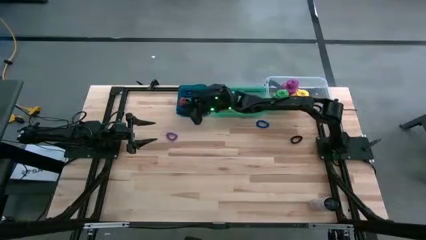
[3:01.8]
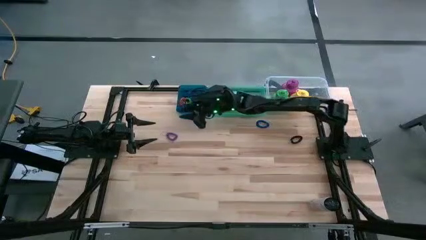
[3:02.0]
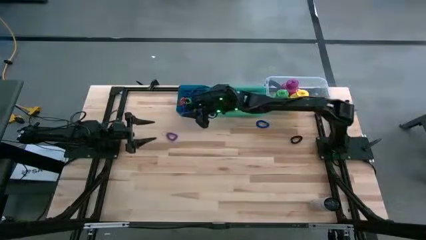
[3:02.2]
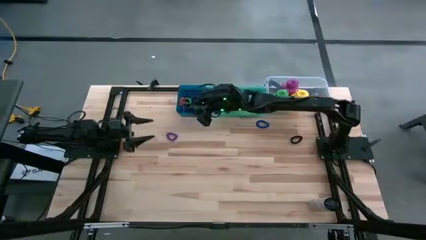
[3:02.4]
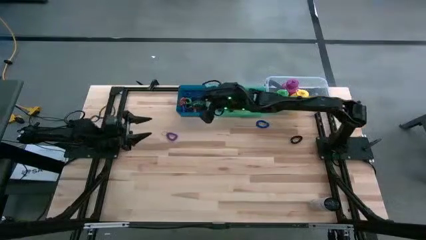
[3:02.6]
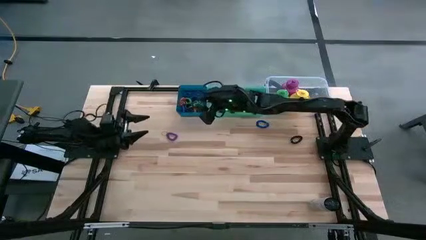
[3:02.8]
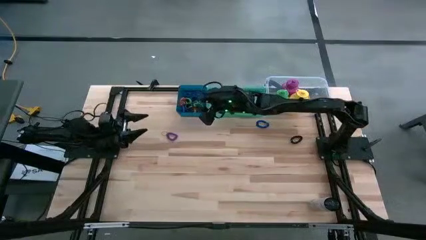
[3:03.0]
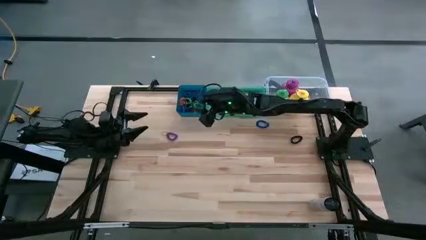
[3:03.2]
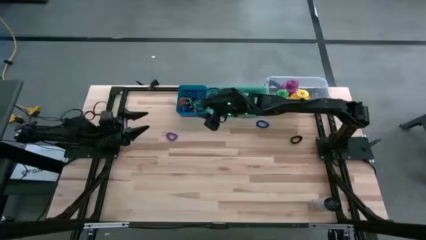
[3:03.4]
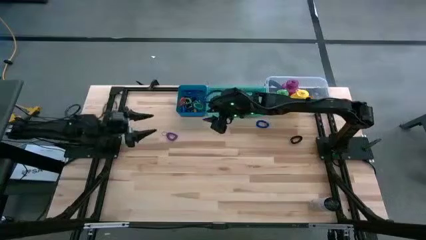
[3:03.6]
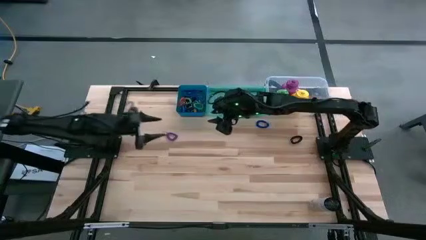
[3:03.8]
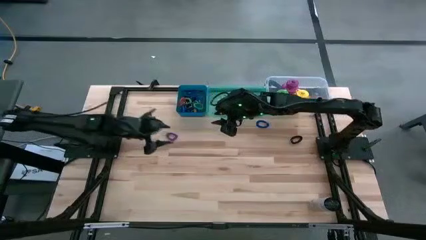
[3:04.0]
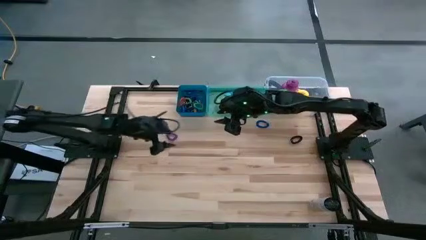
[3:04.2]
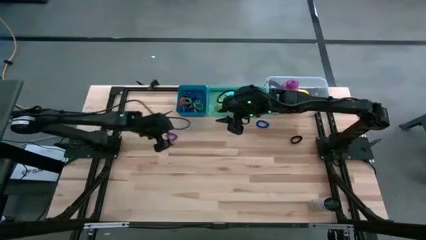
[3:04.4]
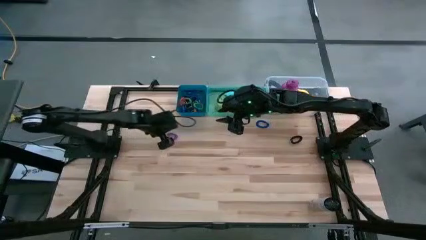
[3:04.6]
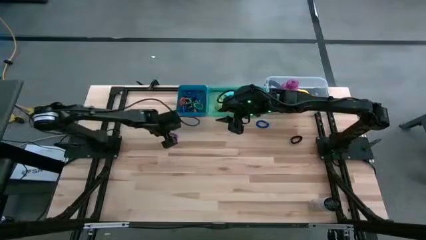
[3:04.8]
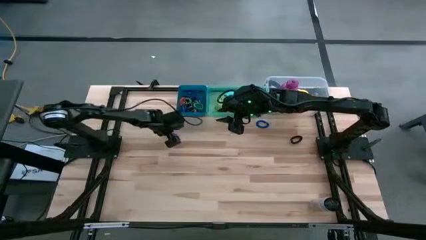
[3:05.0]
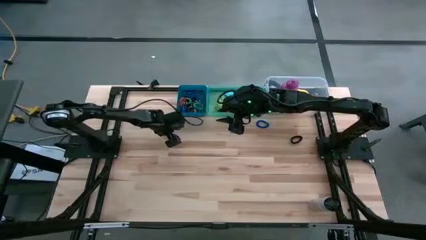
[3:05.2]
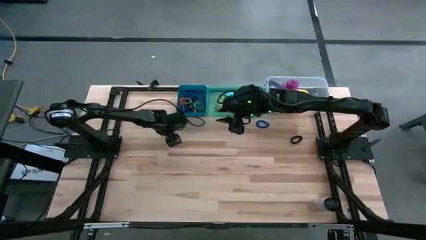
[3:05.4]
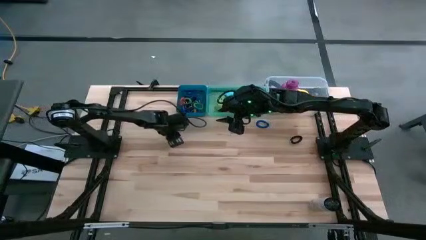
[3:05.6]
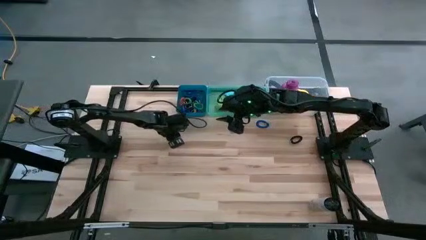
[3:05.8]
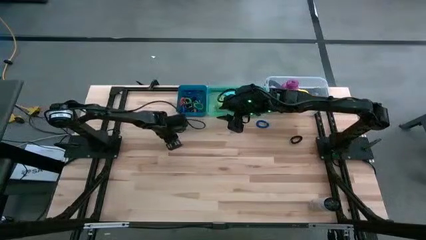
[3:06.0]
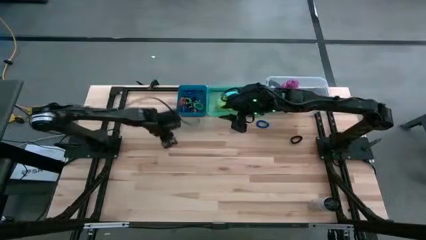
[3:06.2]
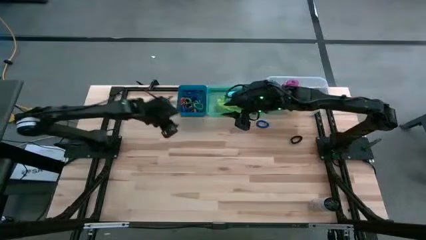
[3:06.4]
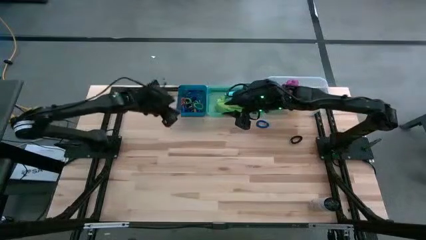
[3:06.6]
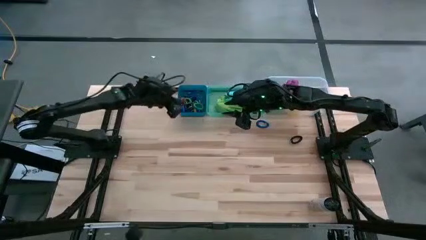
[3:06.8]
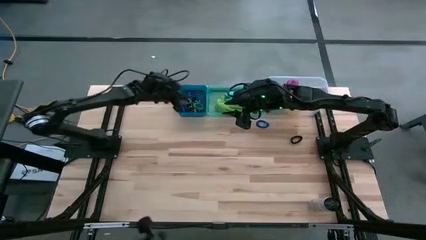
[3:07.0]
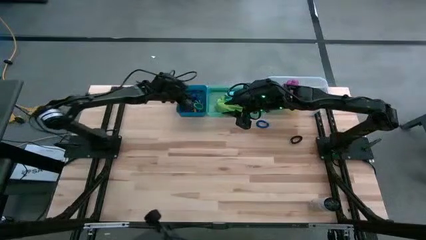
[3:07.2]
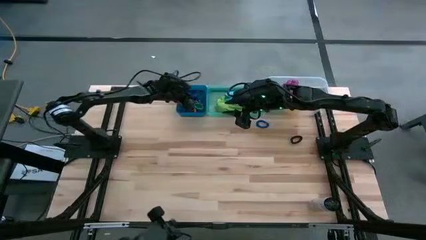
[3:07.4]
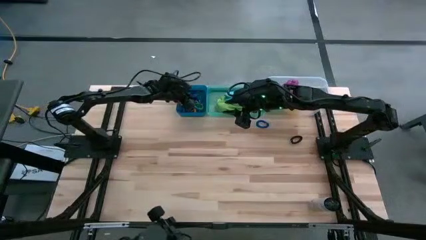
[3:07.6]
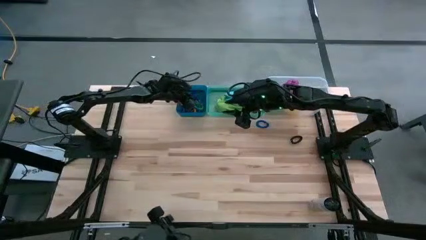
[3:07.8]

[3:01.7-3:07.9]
Task: Pick & Place Sports Items
Put the violet spring keychain into the blue bin

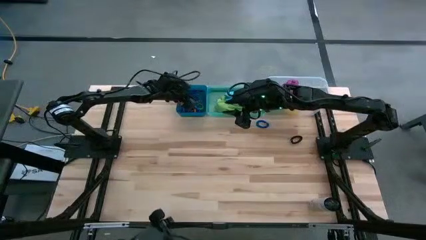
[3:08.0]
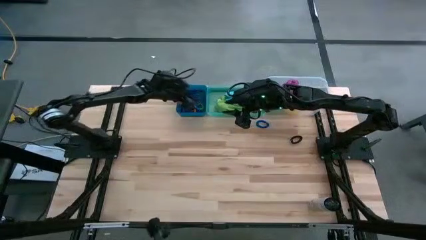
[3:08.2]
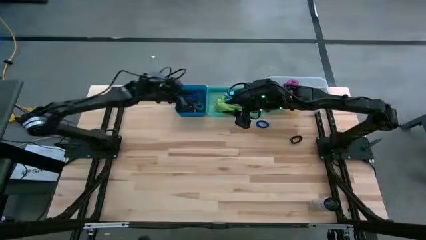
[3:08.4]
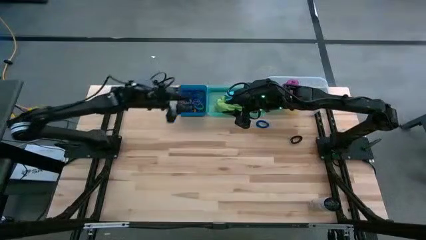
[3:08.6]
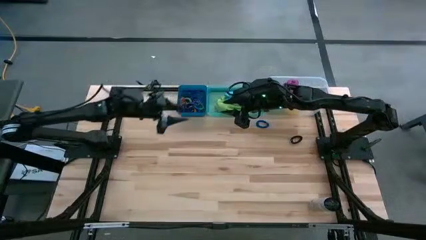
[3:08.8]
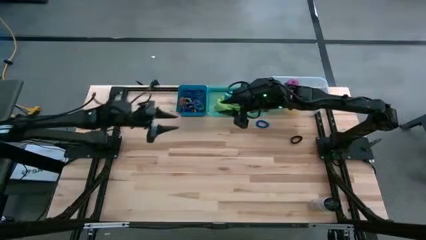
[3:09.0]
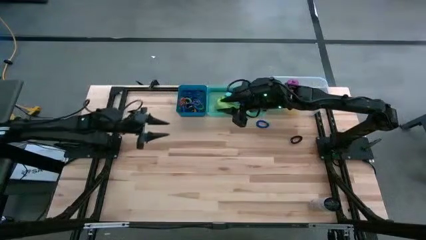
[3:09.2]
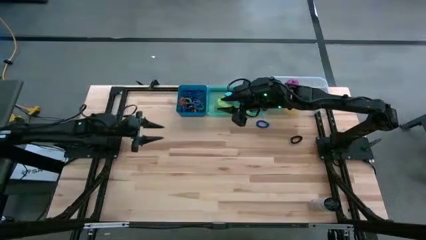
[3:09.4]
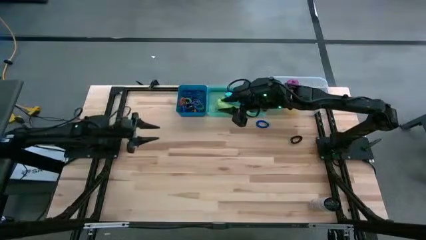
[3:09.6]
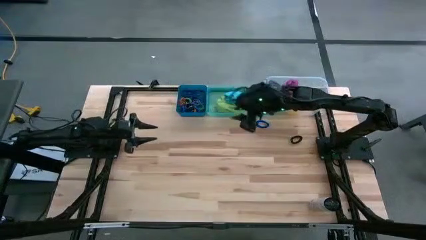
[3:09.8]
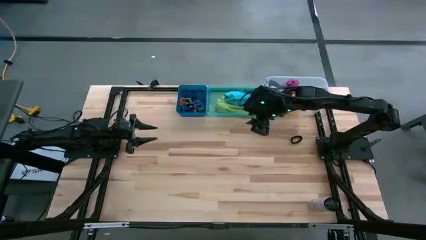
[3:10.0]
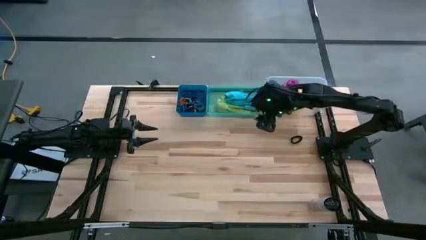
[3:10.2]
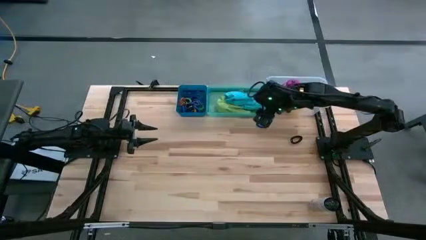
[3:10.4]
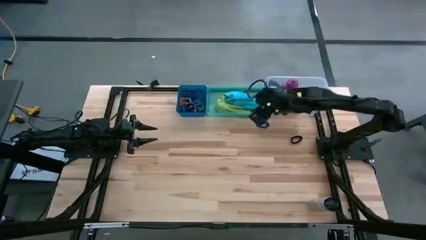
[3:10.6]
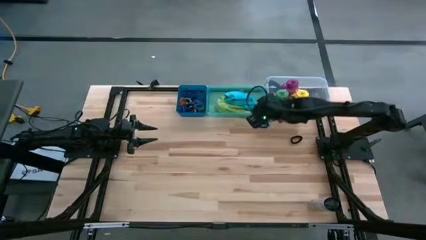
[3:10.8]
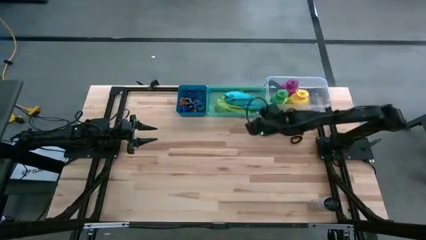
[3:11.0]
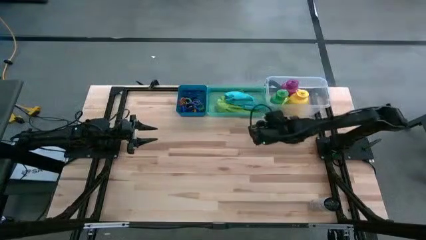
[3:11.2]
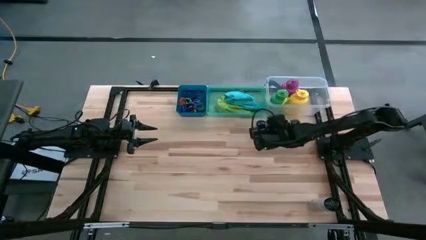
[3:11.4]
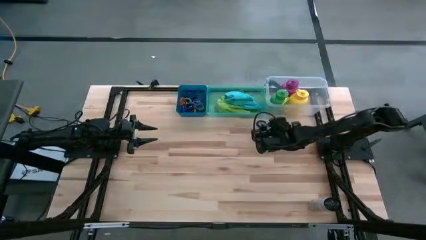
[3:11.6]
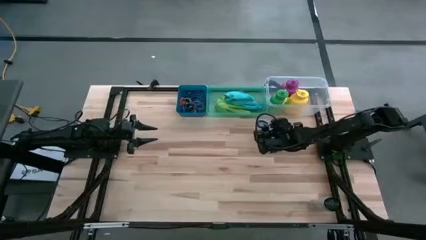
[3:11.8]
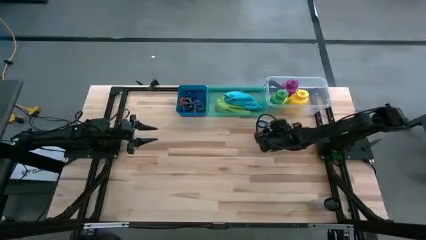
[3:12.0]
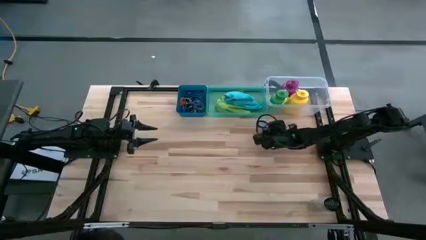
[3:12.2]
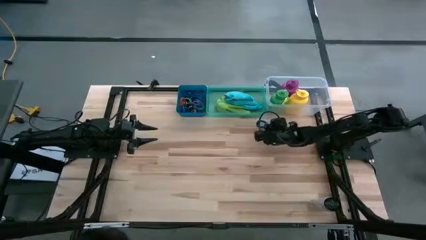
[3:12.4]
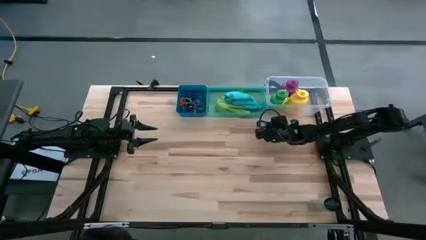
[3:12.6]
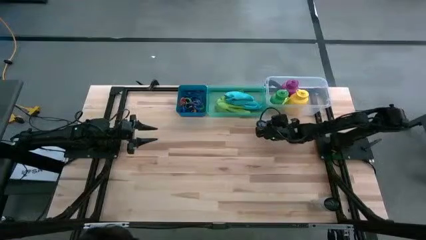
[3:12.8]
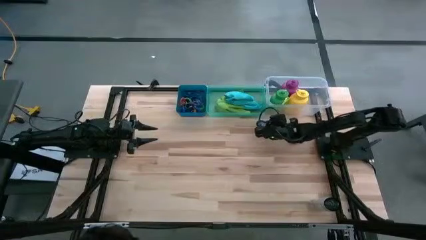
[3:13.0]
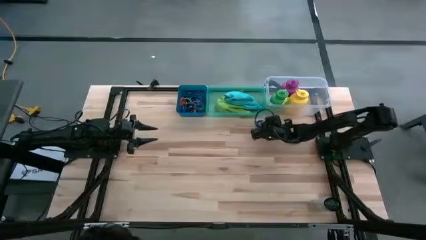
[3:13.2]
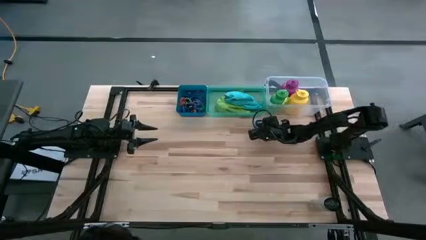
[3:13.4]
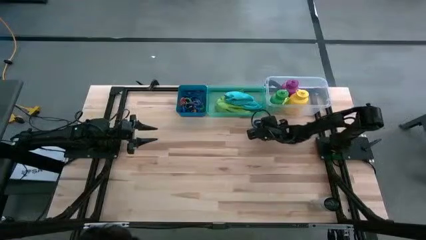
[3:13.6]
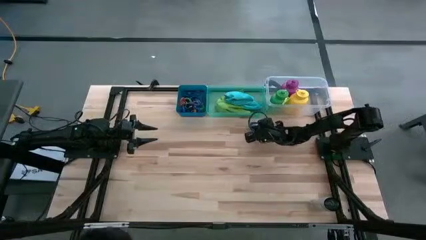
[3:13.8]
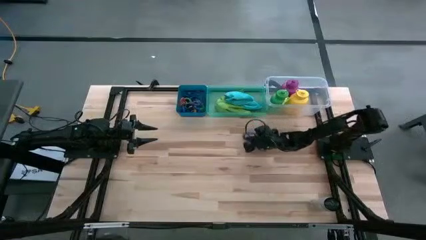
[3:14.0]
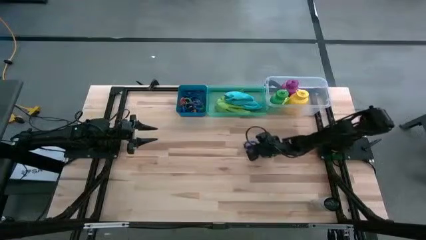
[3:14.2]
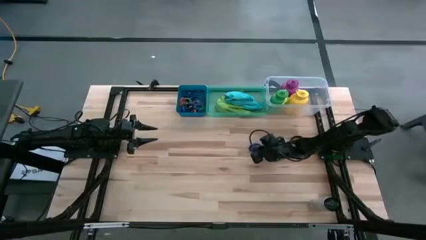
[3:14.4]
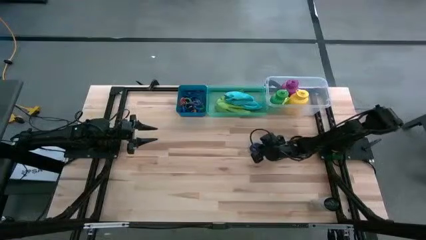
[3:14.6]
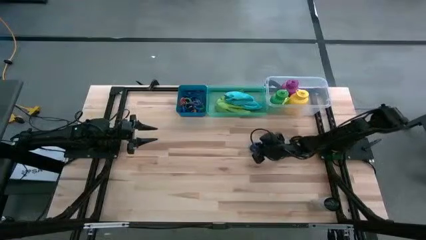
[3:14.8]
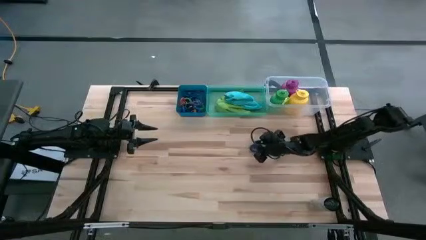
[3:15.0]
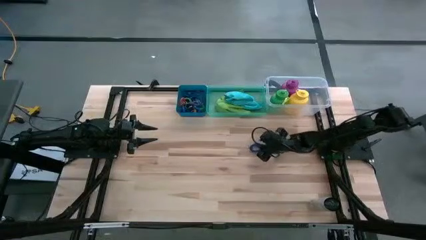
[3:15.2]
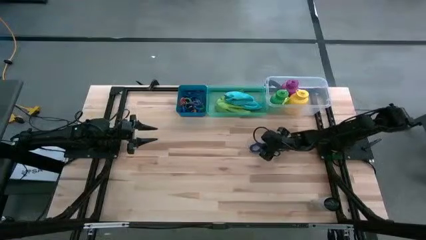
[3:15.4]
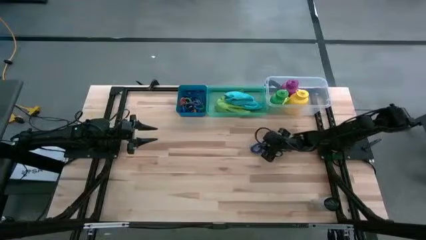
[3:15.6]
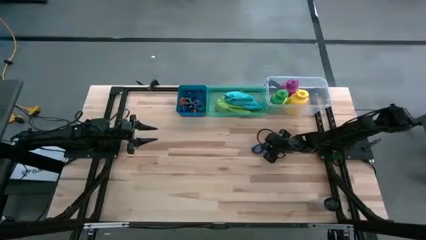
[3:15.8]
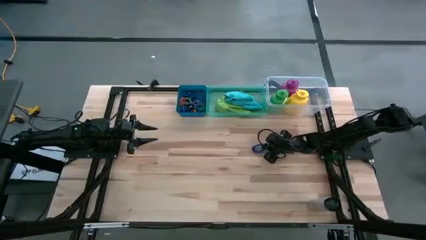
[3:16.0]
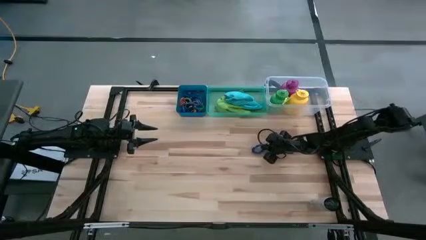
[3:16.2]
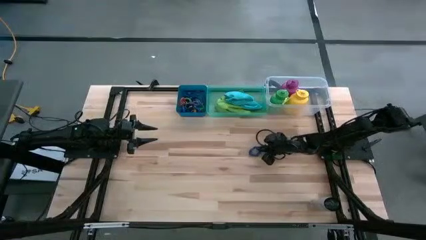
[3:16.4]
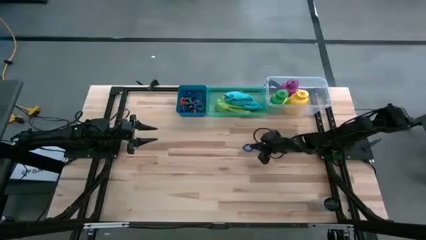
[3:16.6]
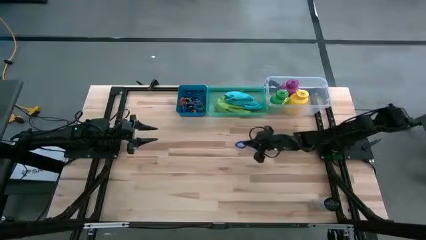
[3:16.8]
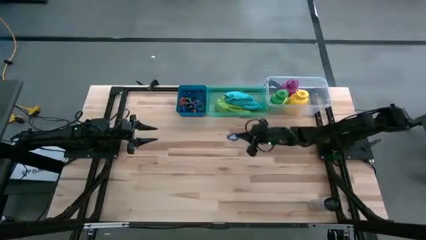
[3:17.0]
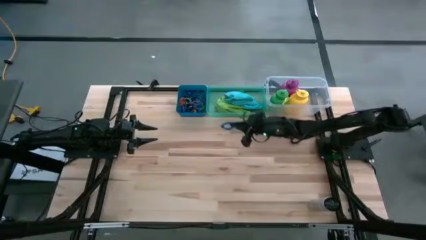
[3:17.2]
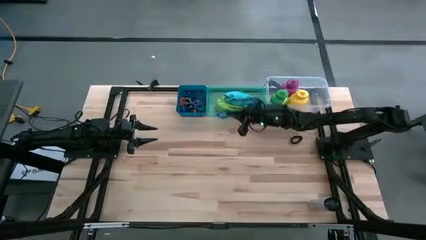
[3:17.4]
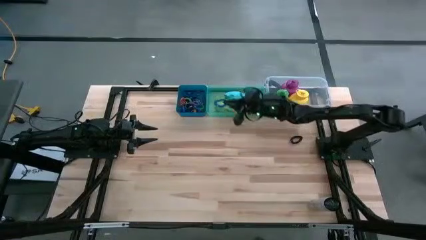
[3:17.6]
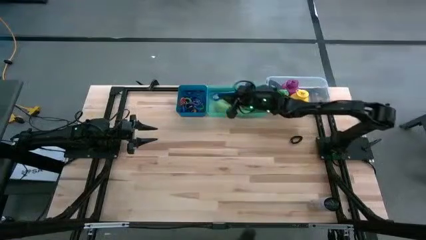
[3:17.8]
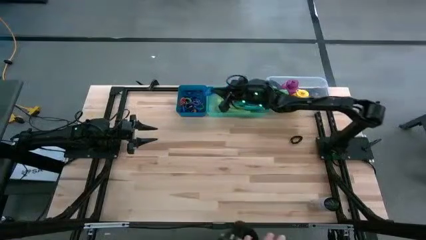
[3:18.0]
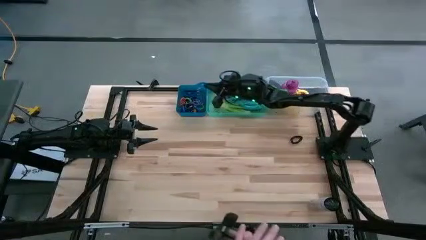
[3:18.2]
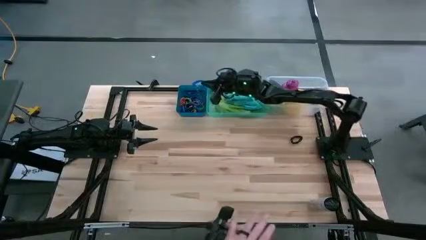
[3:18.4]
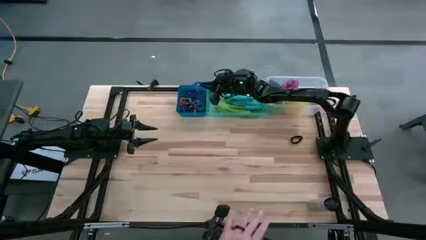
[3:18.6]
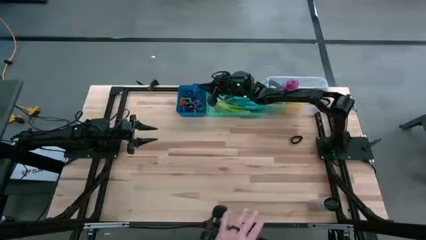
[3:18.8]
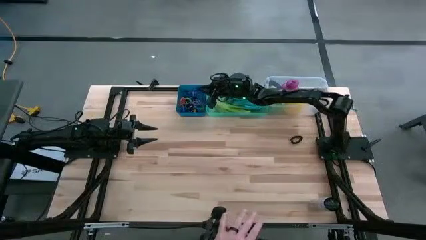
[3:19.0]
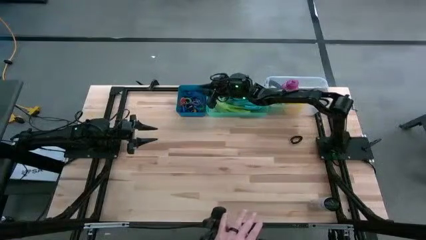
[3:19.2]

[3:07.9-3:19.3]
Put the blue spring keychain into the blue bin
